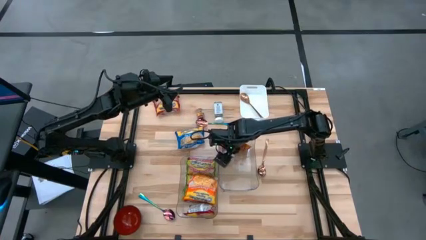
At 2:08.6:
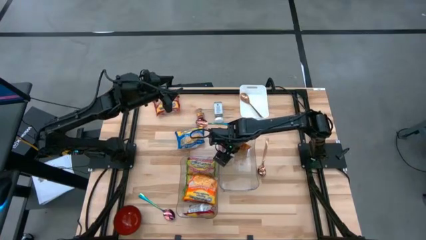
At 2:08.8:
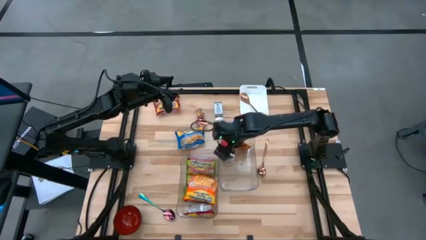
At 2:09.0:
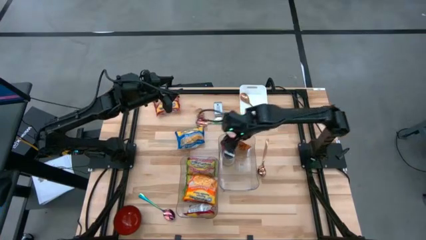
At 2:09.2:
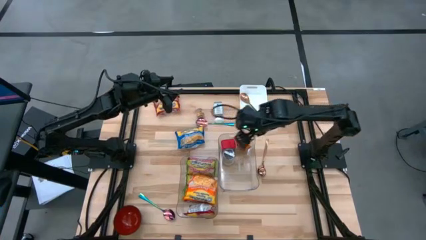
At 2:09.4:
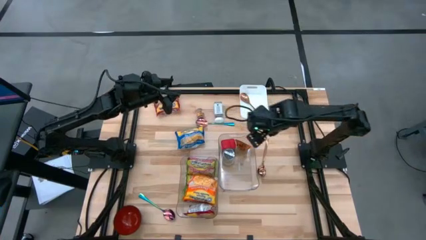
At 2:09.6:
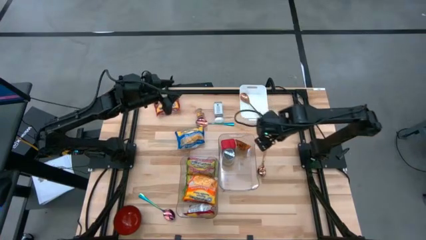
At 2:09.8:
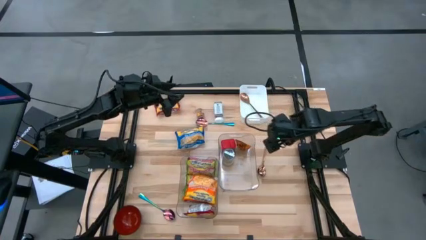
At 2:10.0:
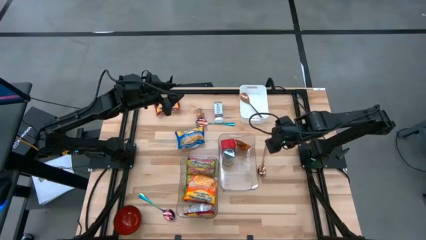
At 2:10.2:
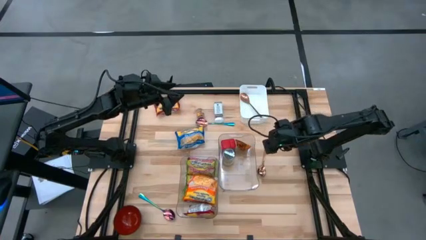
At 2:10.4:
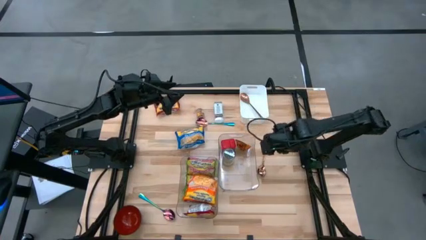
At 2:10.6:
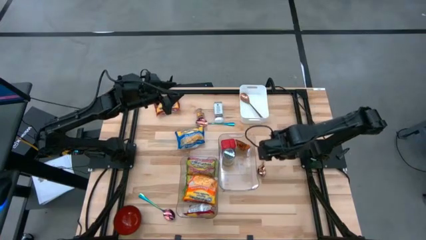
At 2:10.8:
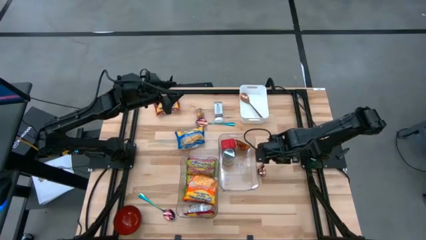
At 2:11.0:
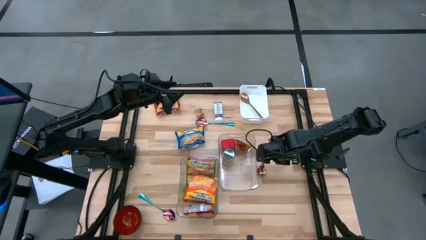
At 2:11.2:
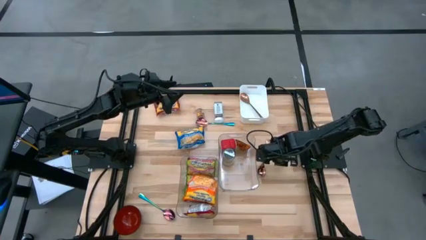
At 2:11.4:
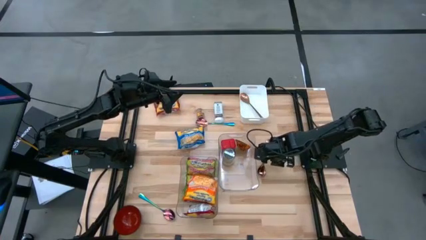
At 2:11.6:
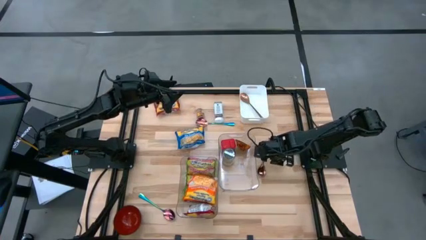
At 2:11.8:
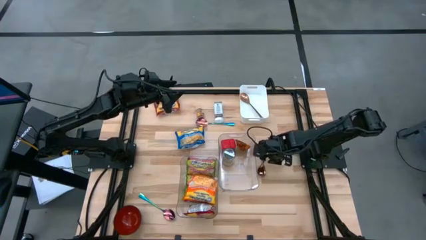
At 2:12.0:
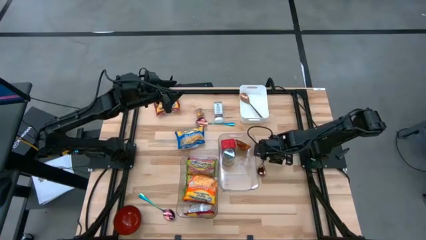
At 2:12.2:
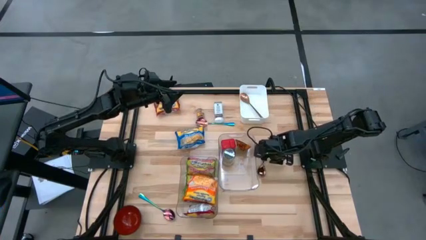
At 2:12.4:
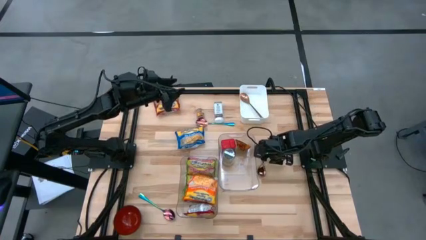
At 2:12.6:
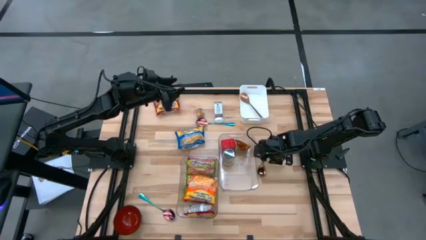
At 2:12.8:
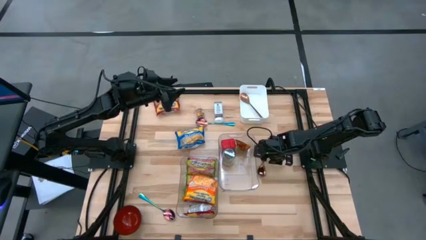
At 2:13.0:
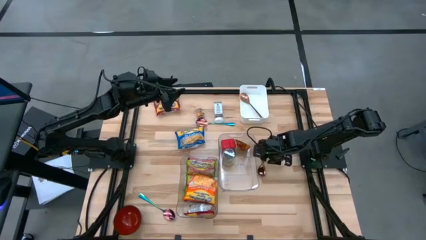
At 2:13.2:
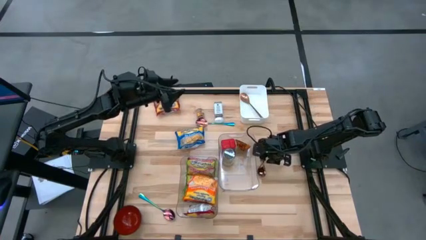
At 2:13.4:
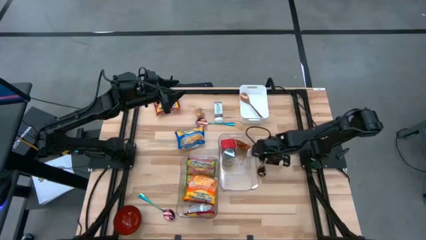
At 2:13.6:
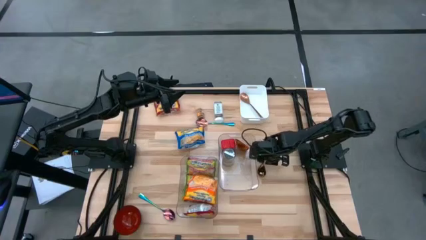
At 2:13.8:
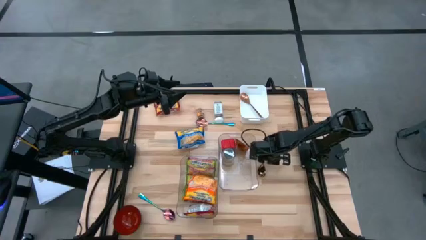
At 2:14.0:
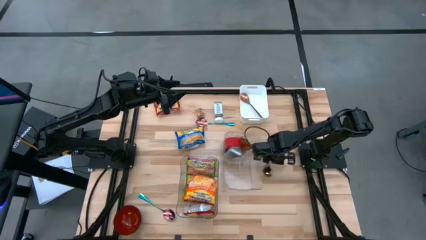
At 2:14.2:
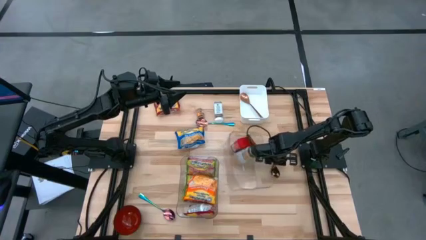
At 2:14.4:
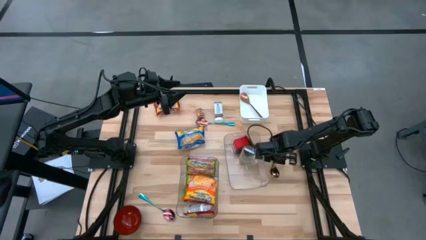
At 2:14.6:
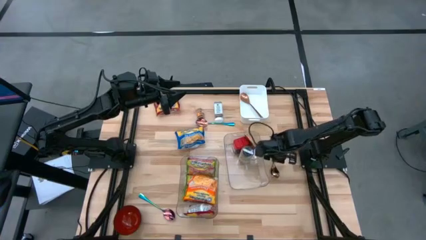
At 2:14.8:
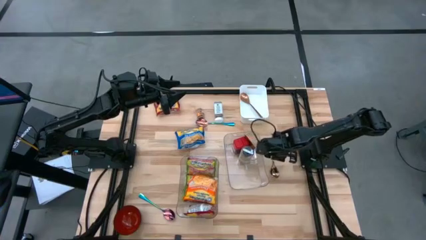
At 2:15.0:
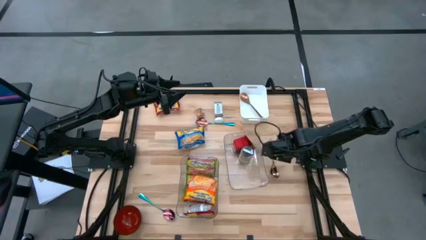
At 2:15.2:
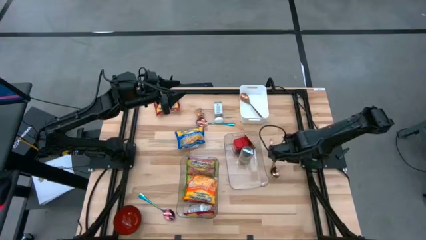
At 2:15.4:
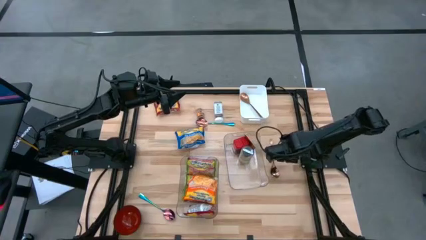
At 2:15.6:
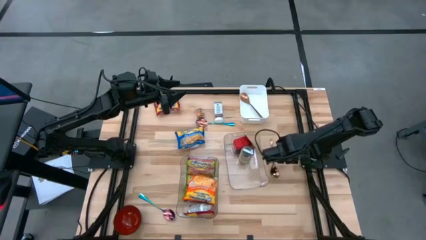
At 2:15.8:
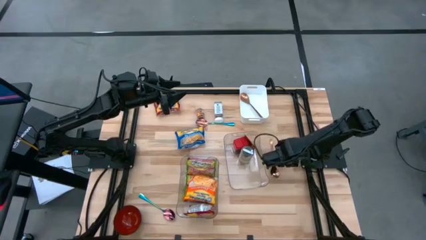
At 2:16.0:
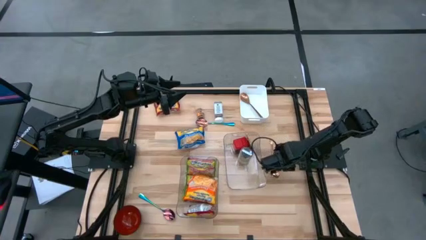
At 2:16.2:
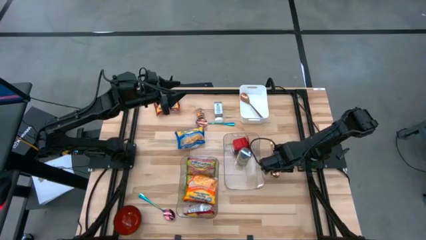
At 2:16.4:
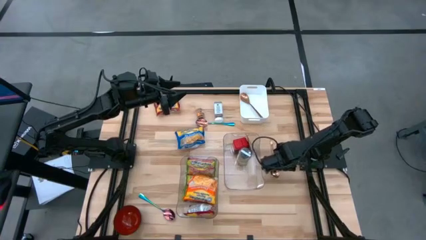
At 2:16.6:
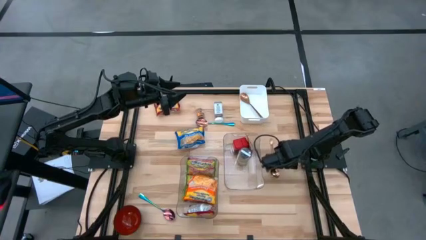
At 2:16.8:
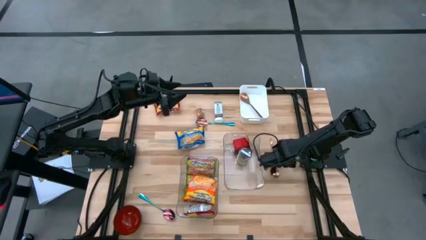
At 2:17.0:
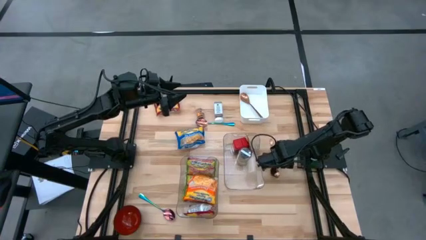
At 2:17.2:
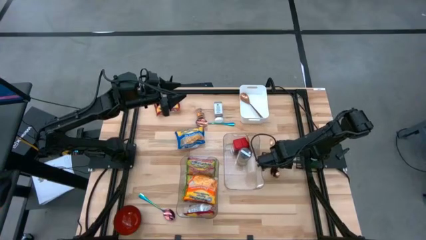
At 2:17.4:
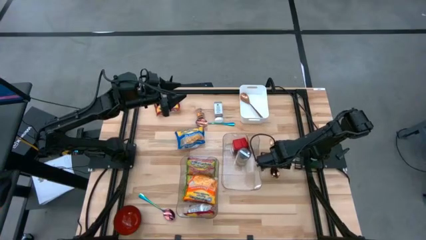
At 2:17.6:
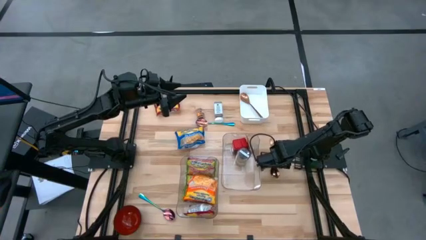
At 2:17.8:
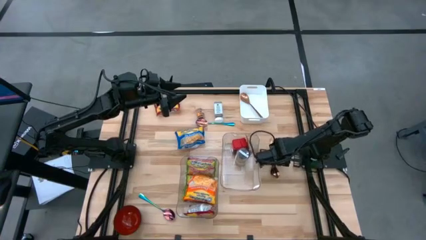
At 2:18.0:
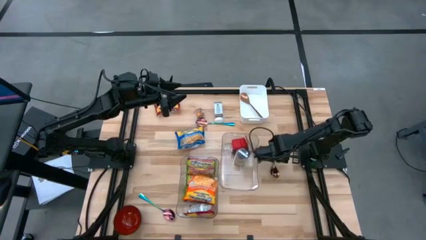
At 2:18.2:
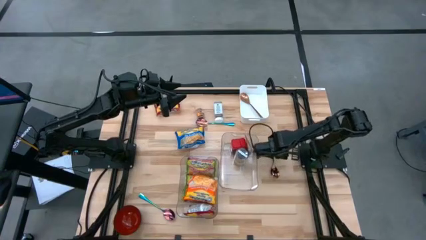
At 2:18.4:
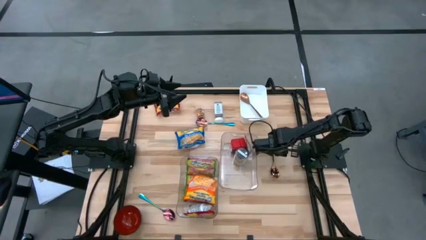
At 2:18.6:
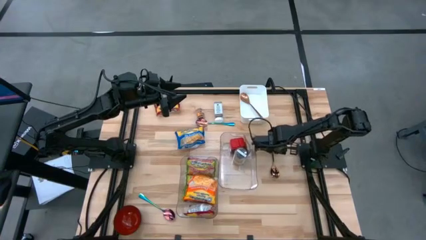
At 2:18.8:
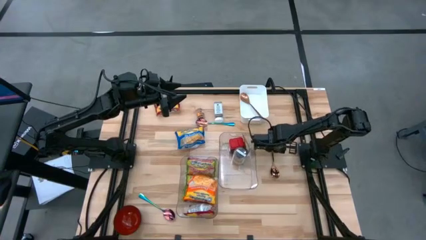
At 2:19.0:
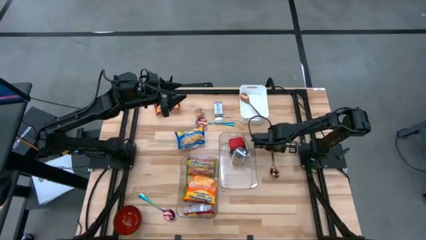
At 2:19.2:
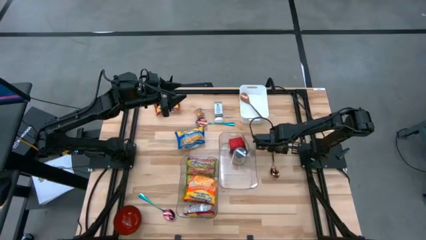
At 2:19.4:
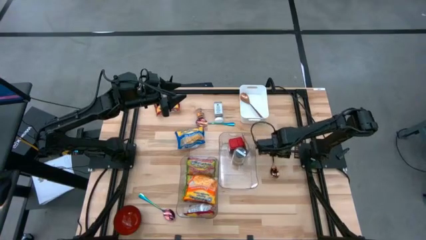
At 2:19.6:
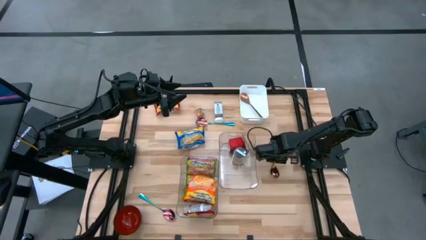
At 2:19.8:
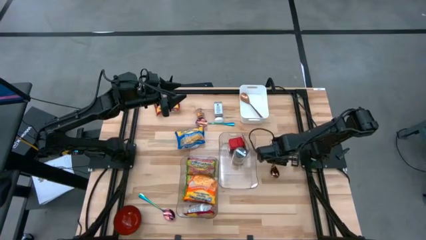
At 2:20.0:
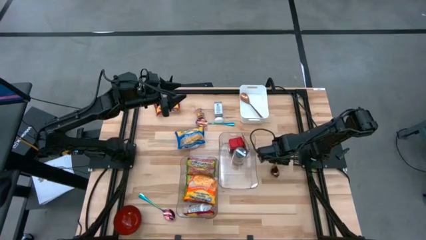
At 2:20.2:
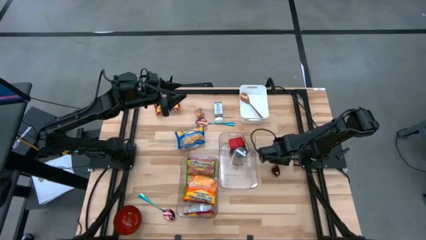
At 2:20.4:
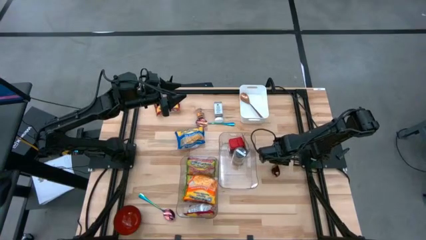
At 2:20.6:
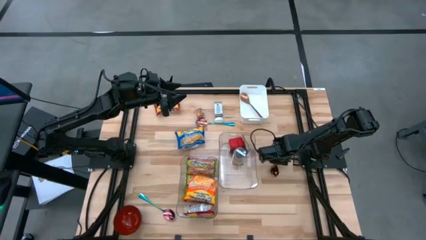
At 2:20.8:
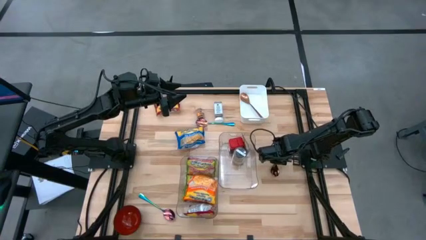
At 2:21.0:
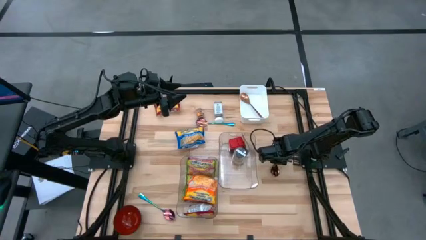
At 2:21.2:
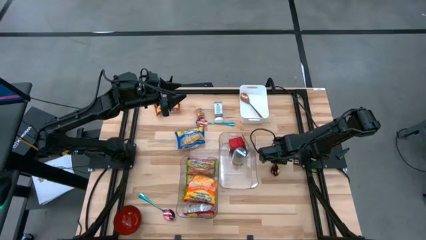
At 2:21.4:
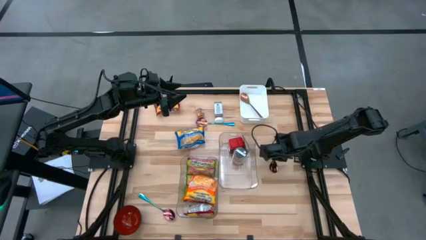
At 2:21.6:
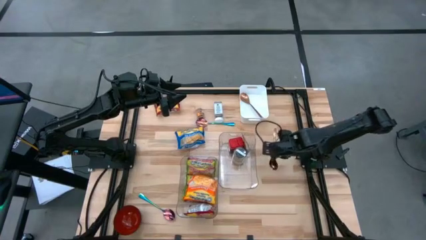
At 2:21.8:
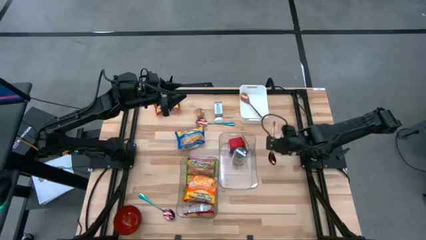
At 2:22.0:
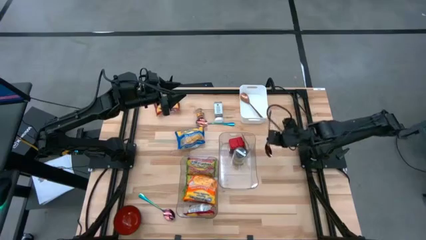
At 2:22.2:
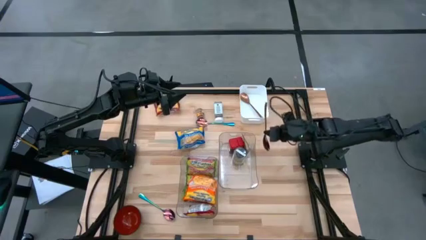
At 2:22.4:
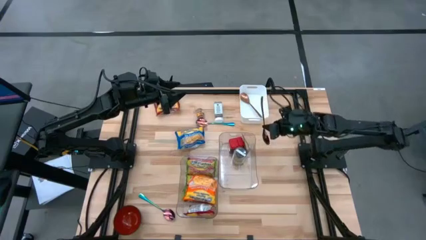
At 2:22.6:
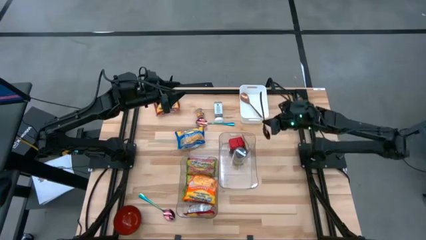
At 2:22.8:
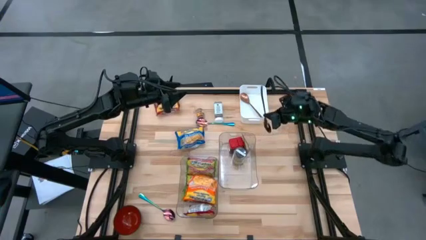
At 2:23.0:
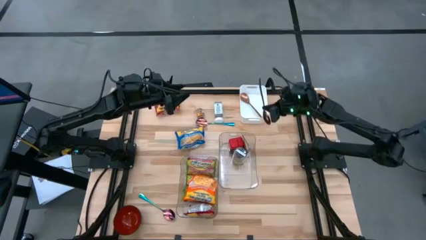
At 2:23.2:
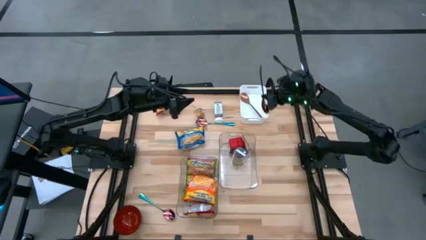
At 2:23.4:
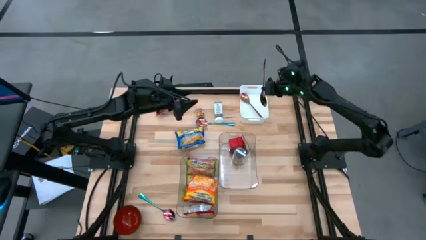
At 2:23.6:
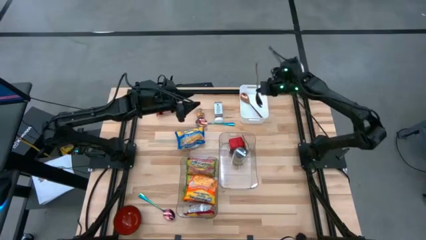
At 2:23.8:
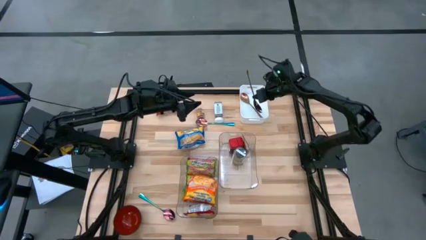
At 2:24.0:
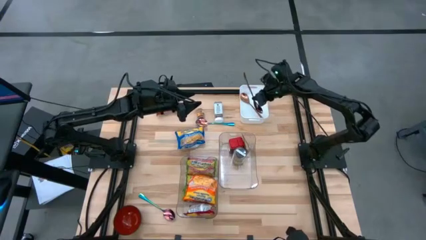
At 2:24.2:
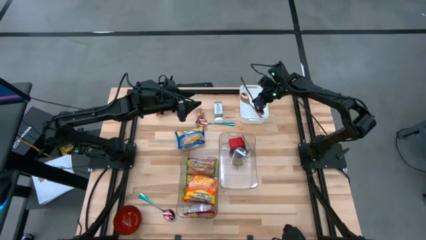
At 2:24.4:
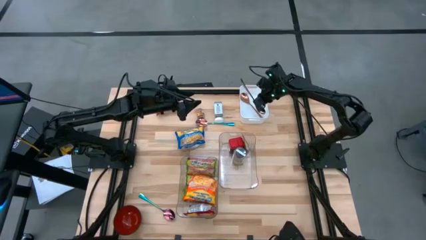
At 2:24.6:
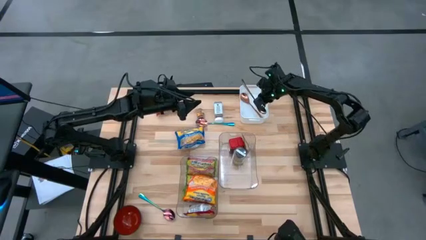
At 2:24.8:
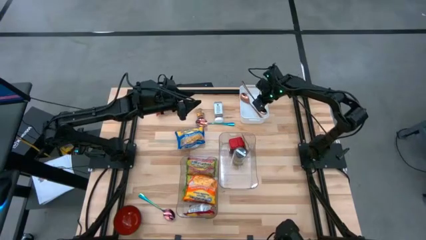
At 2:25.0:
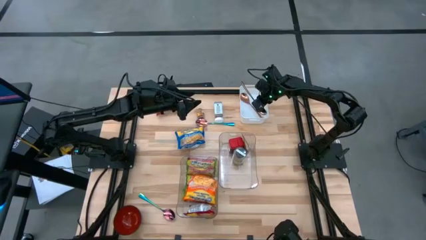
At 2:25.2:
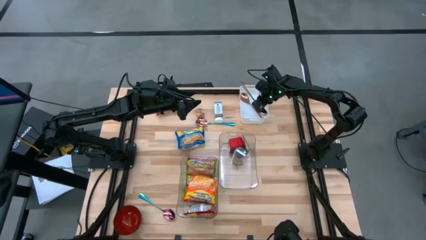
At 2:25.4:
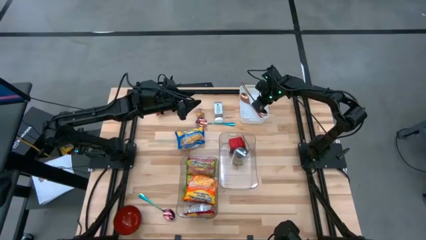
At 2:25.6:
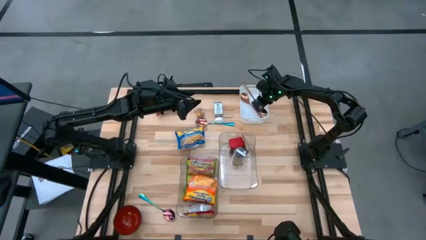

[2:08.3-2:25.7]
Task: Pick & Place Food Item
Put the gold spoon into the white bin
